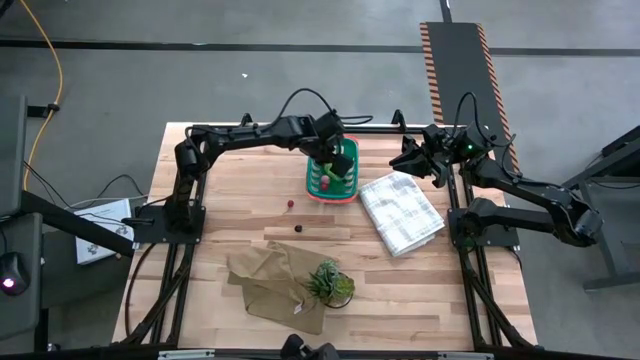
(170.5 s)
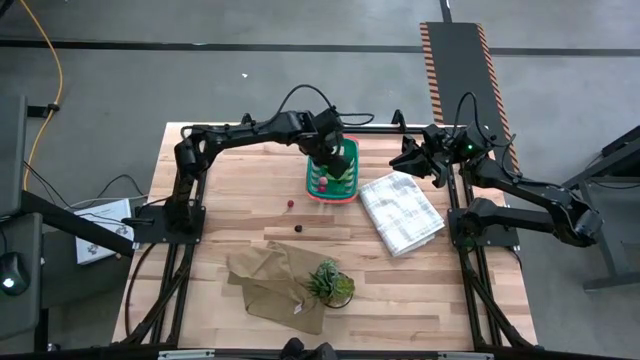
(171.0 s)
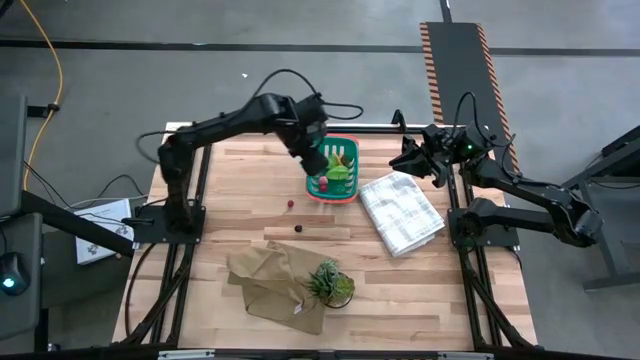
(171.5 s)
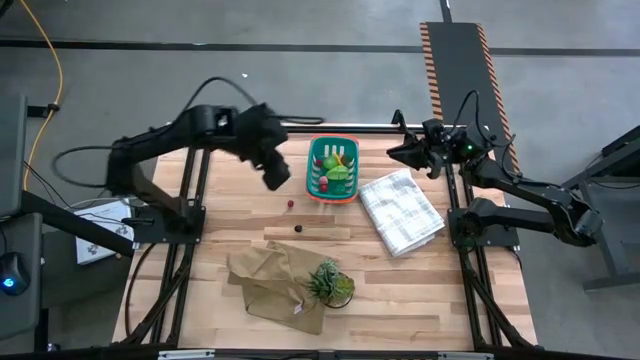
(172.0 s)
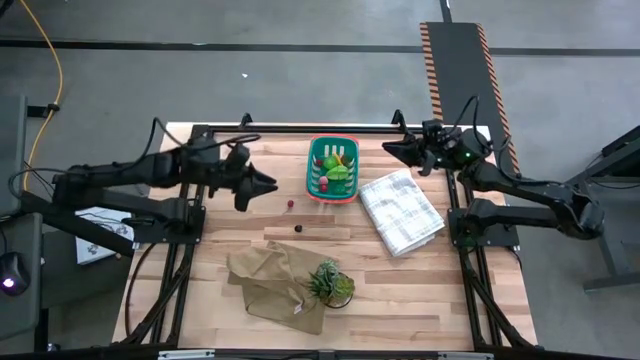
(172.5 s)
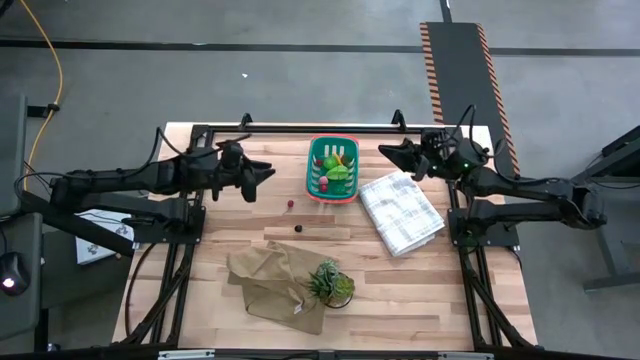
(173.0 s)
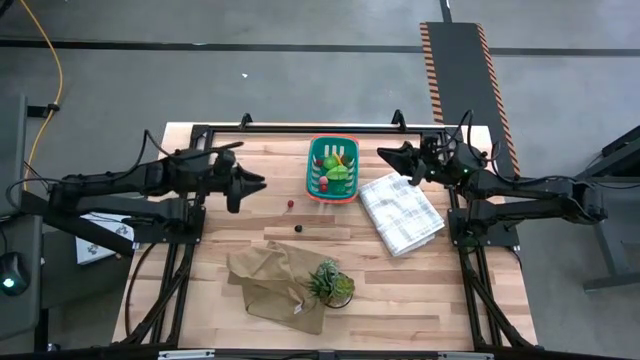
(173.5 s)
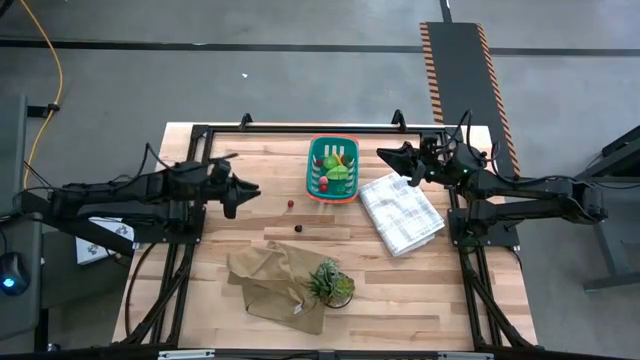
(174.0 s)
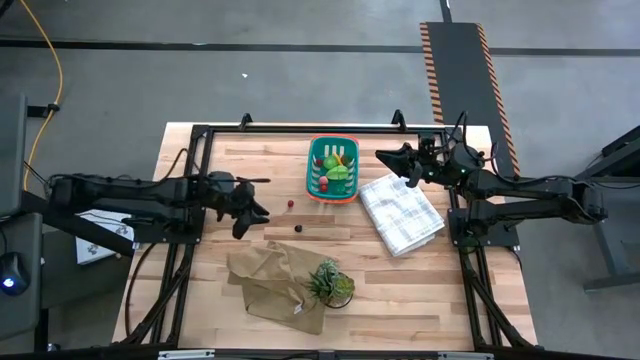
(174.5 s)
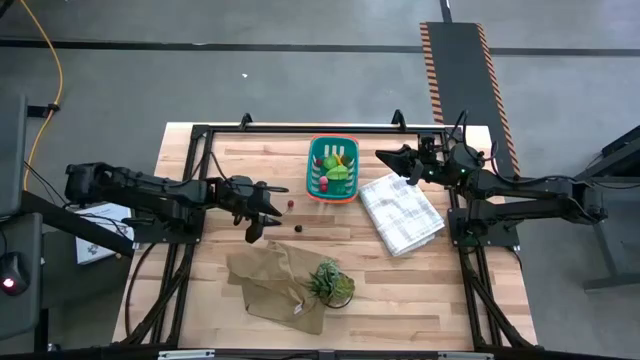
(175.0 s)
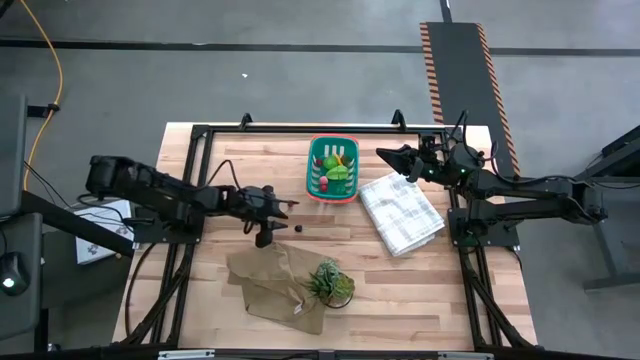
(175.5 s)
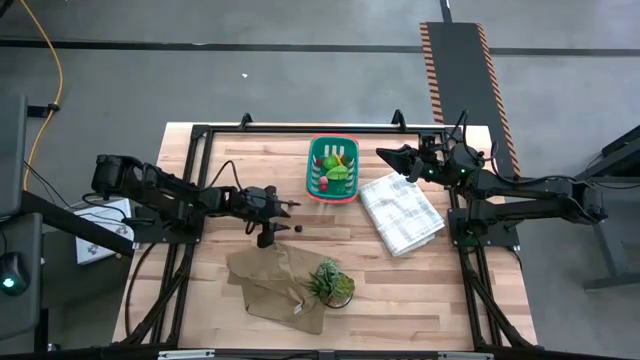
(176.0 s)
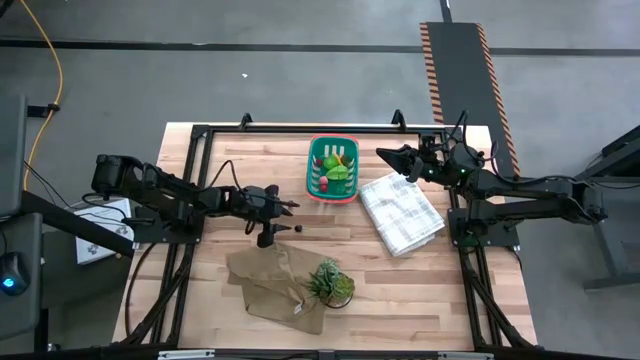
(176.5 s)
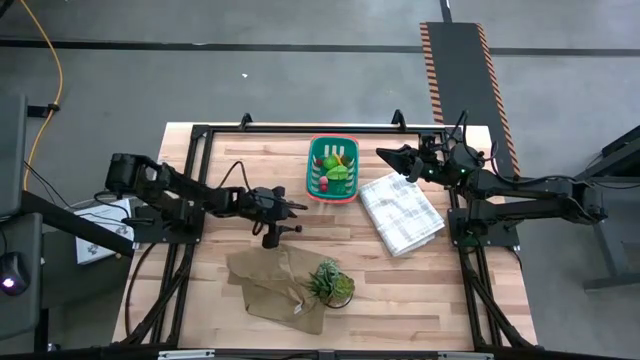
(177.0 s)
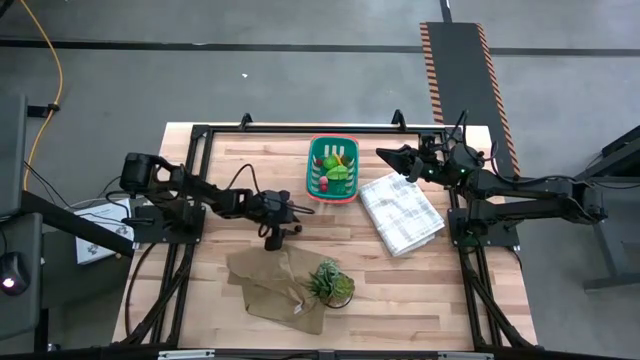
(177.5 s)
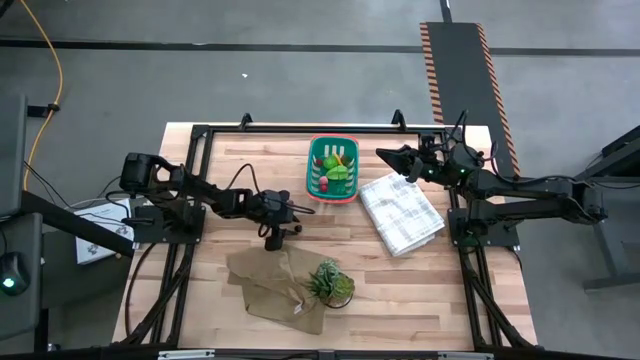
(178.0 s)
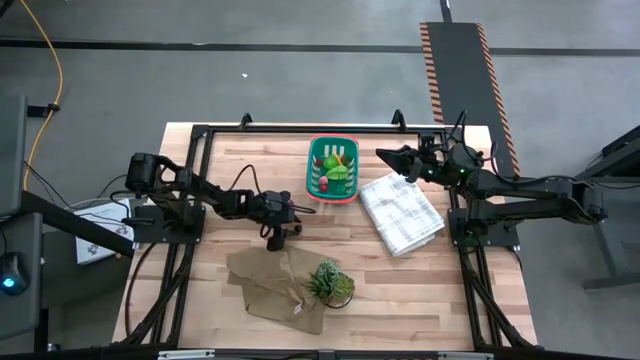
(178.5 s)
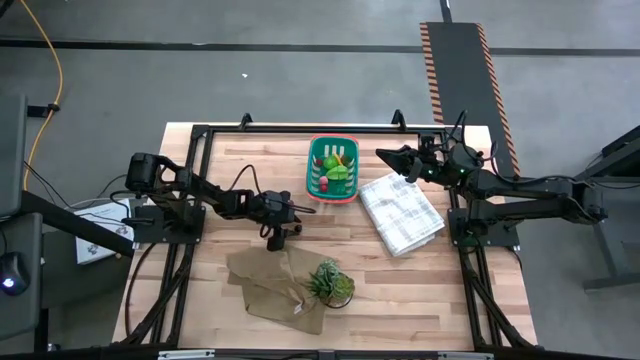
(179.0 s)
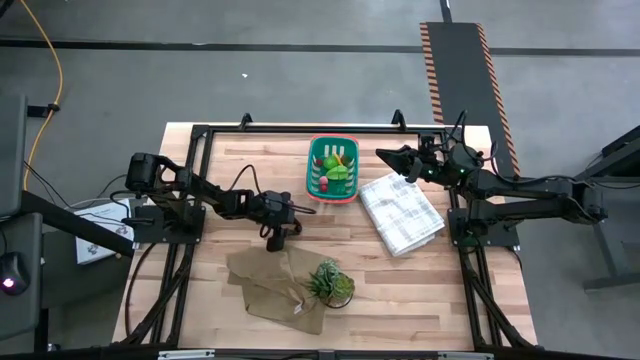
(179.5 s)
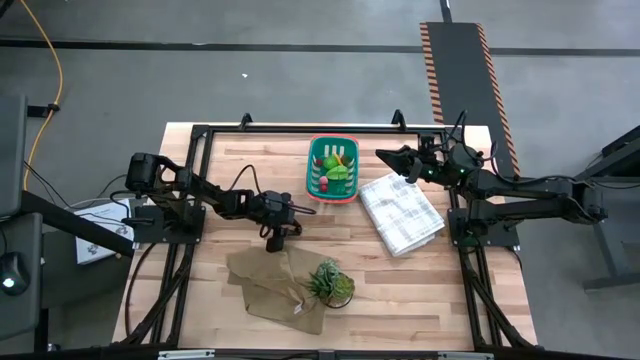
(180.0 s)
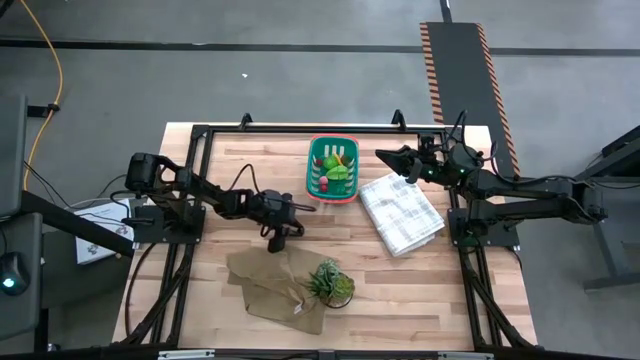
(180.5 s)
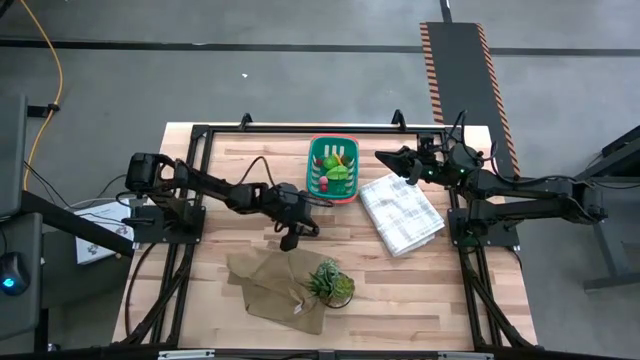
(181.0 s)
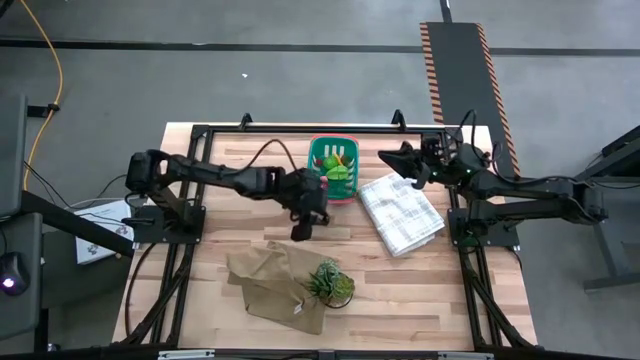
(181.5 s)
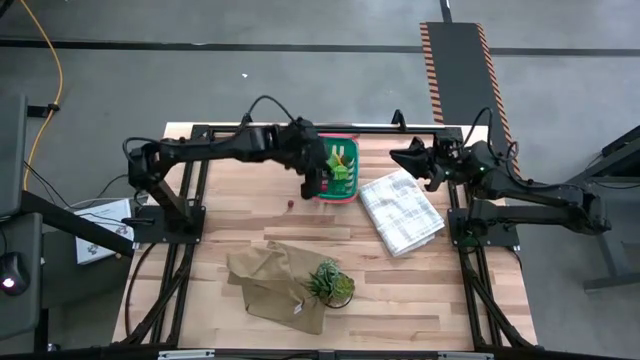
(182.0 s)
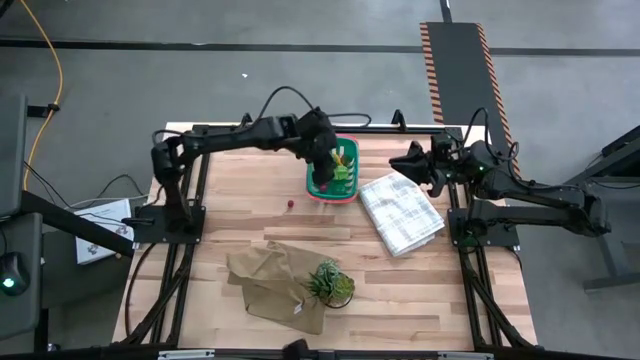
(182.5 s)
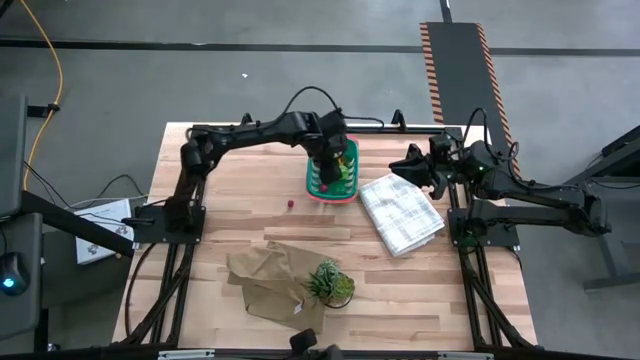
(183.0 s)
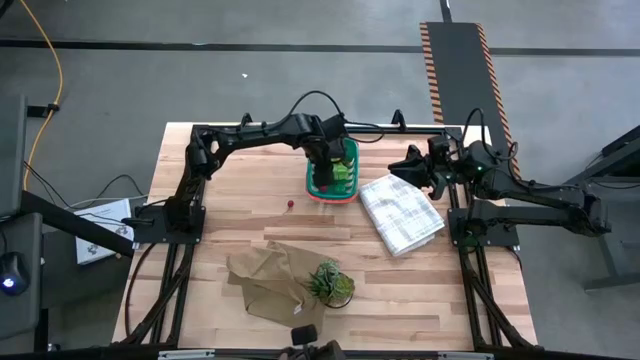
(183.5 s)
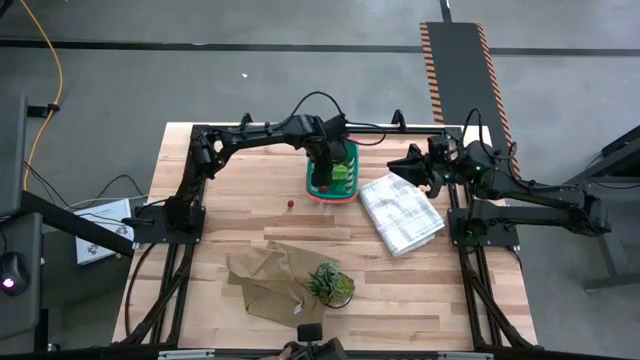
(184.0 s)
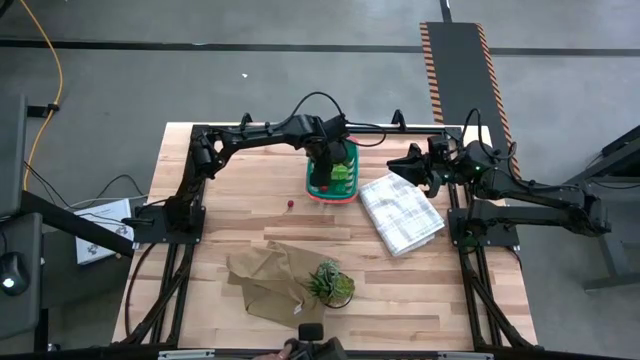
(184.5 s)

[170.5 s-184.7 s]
Task: Pick and placing Produce into tupperware
Put the black cherry into the green basket

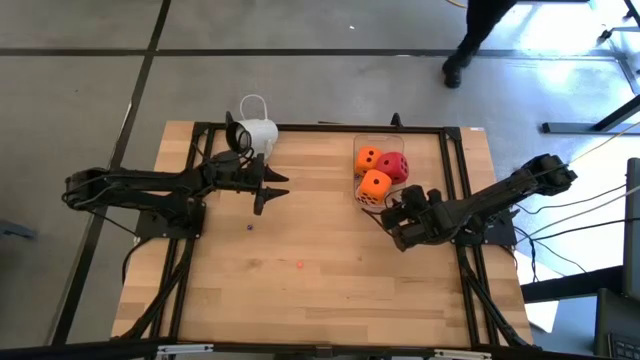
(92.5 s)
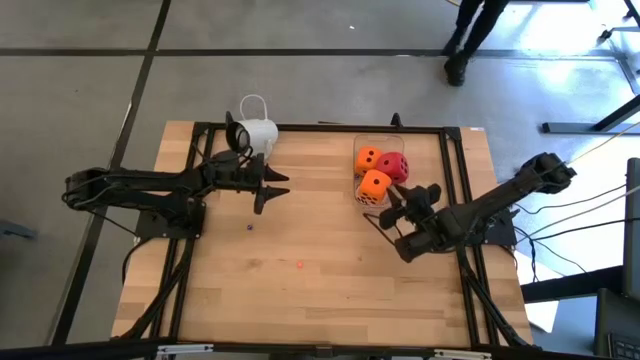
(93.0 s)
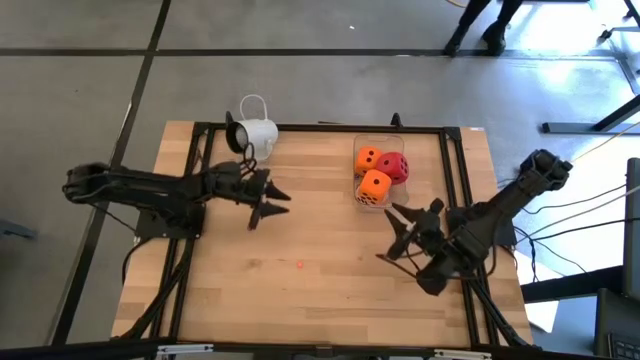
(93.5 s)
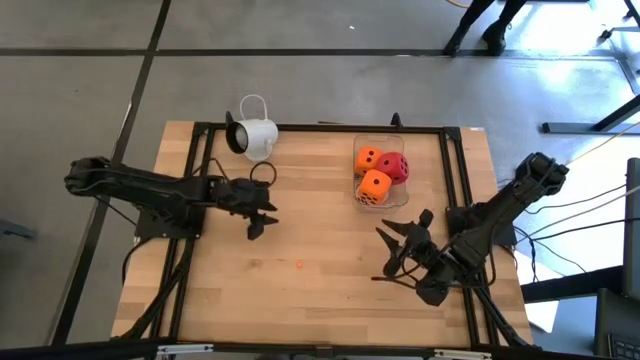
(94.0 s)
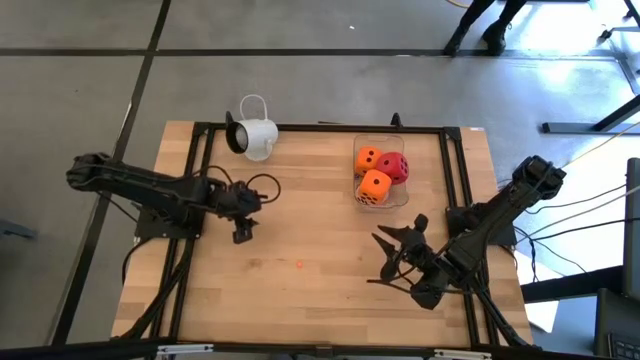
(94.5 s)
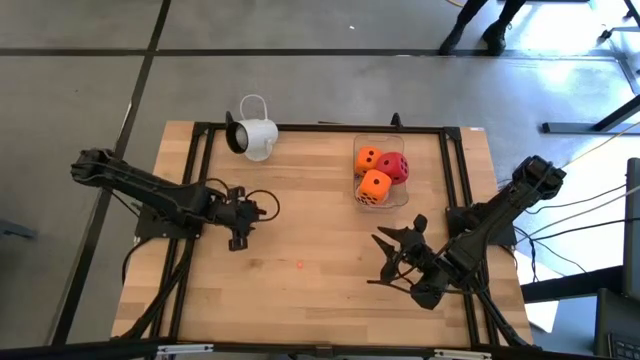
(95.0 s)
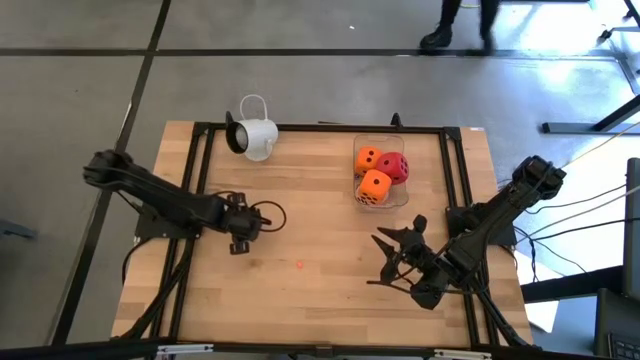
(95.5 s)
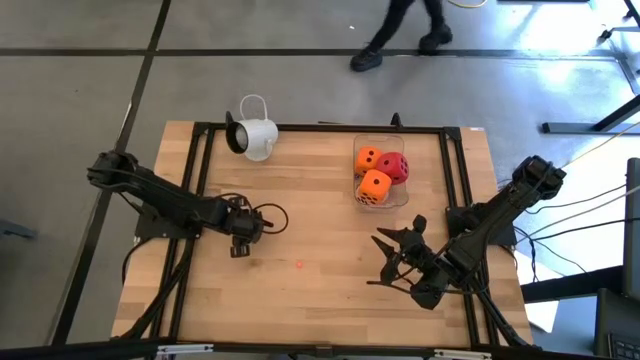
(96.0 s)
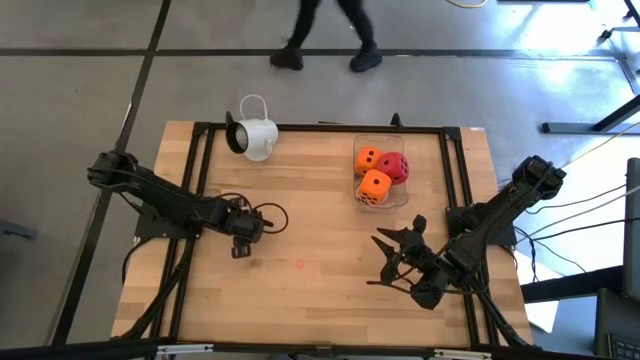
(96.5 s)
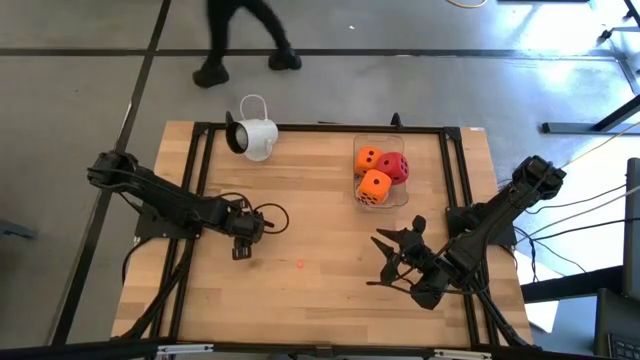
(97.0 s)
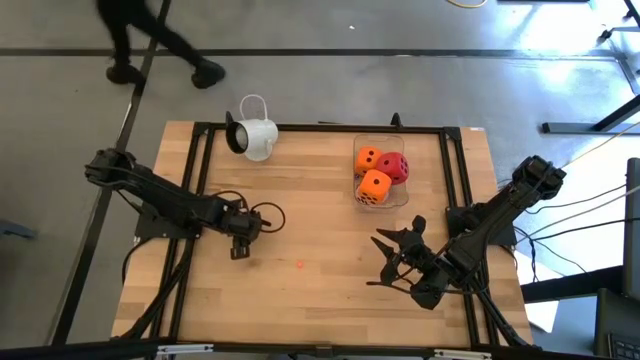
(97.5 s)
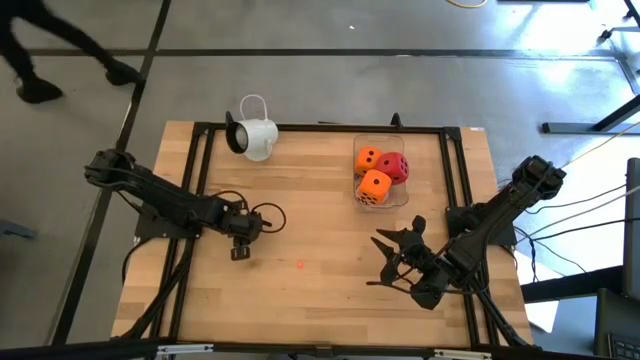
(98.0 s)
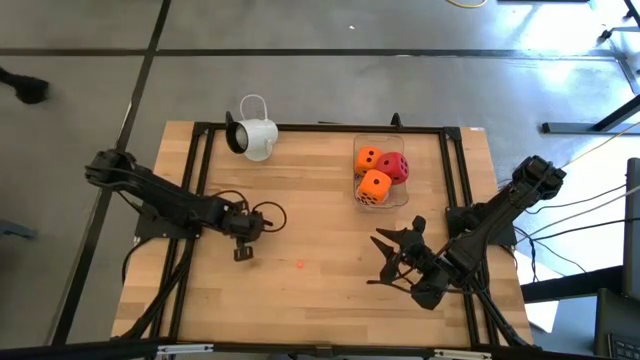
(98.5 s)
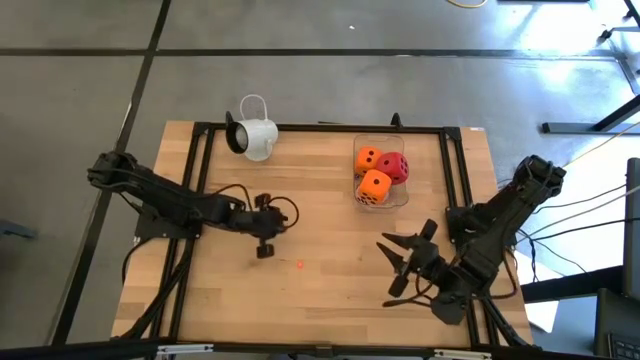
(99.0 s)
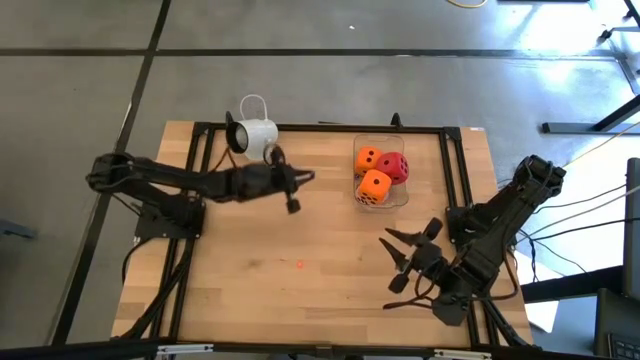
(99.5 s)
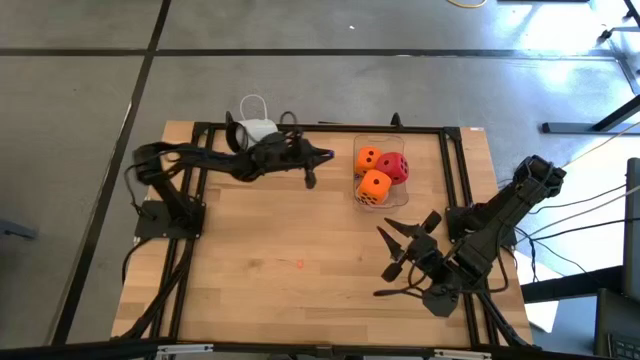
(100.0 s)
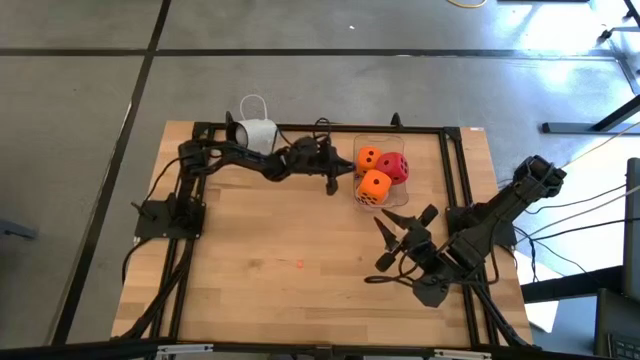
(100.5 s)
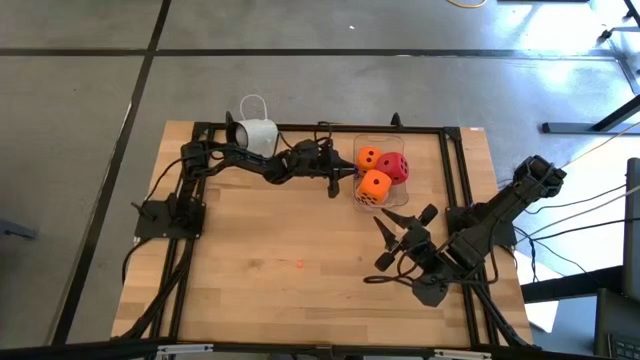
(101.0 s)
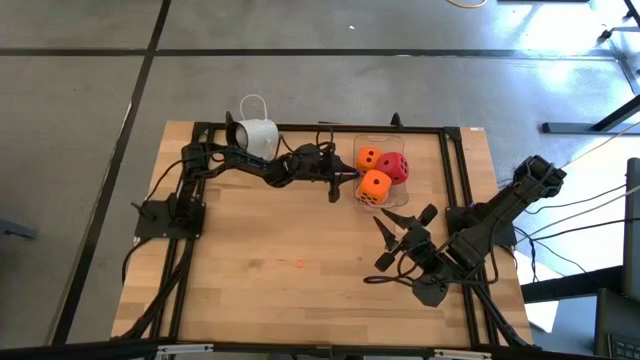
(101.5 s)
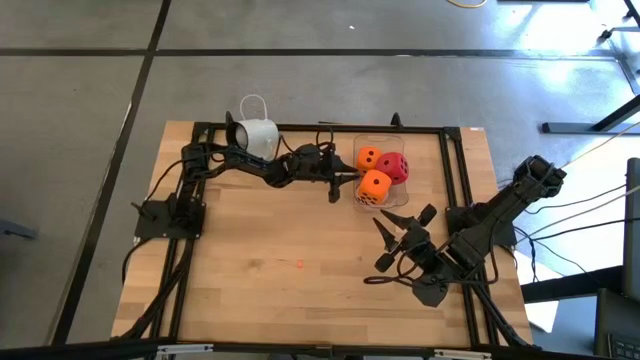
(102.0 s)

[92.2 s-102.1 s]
Task: Pick & Place Dice
Put the small blue die into the transparent bin
